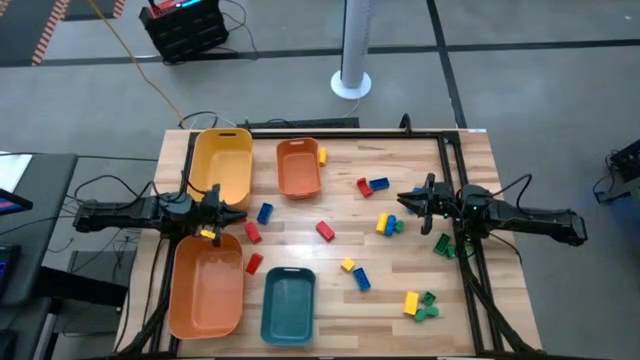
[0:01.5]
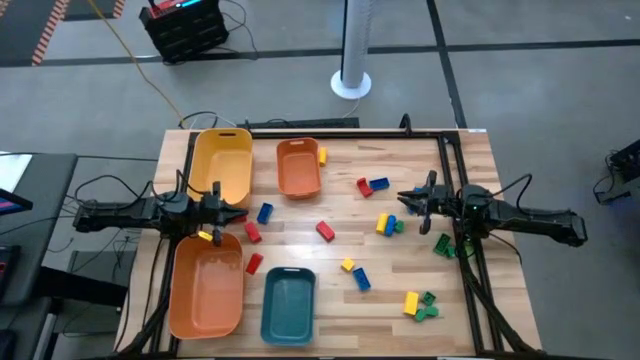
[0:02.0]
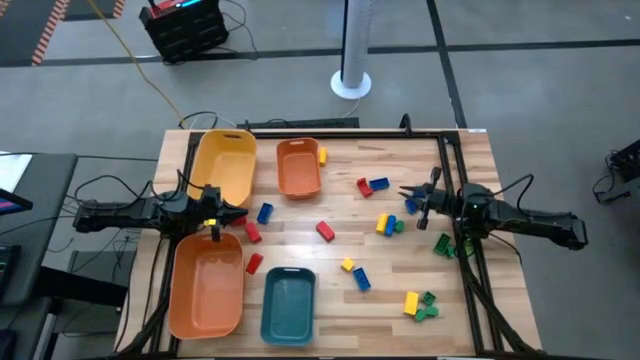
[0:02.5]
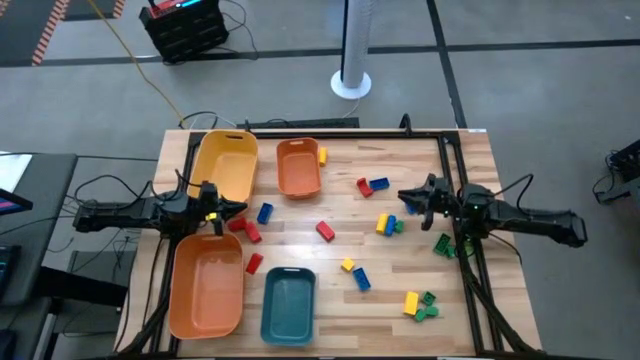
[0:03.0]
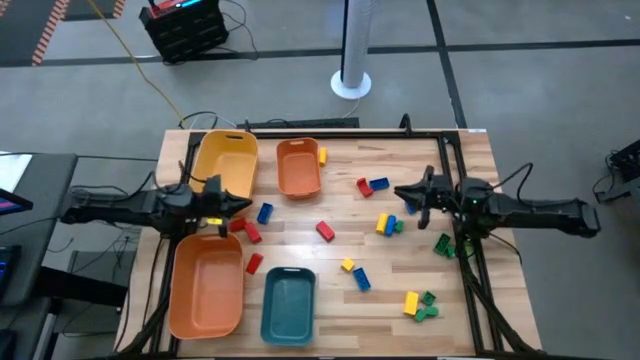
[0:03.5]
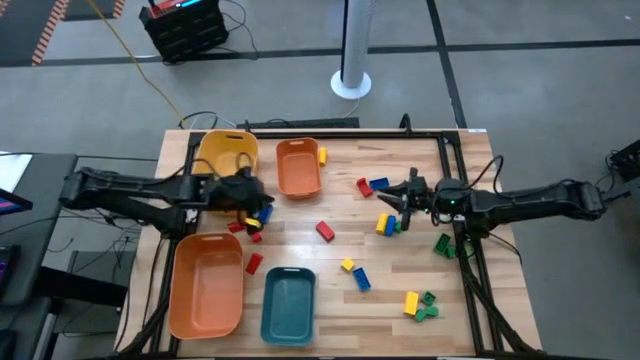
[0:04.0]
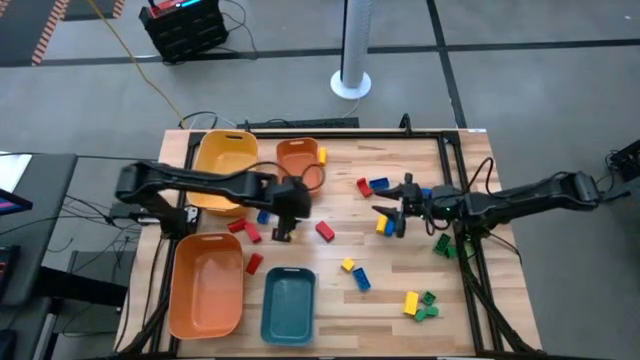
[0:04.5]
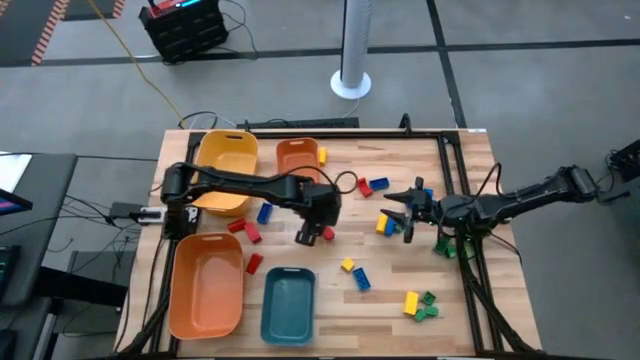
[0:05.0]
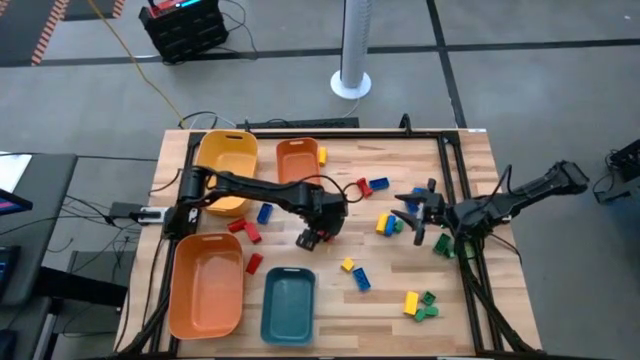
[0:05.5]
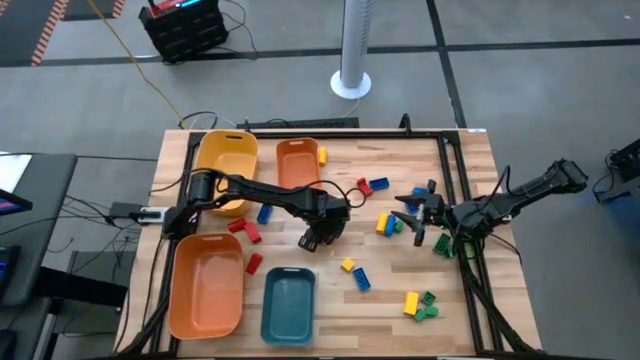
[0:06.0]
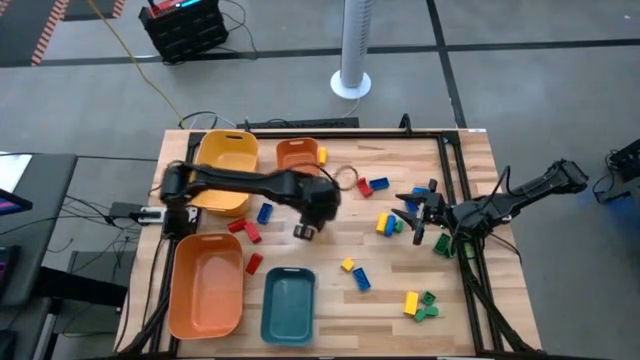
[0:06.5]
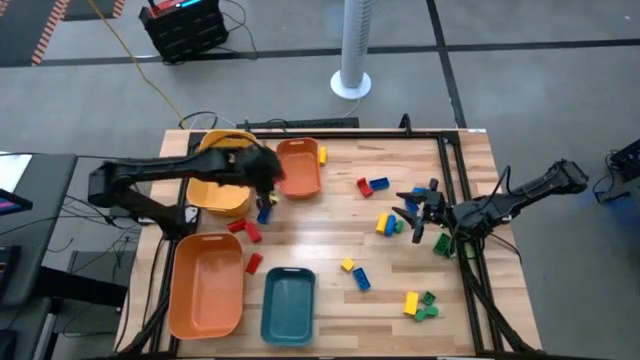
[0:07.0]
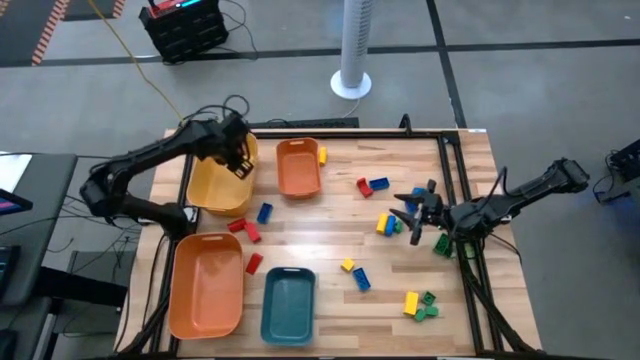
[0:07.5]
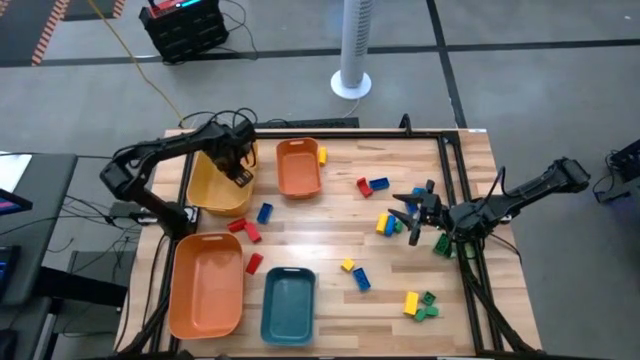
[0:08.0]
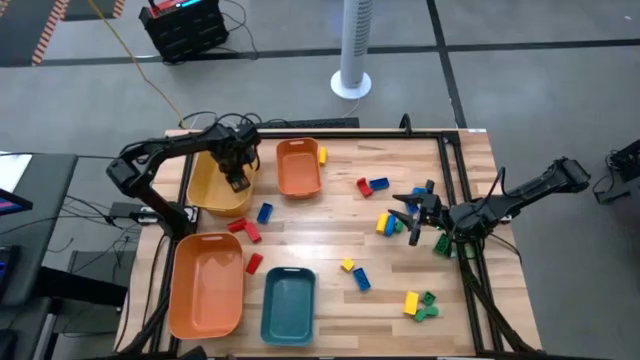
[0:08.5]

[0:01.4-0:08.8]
Task: Sort blocks
Put the red wooden block into the yellow bin

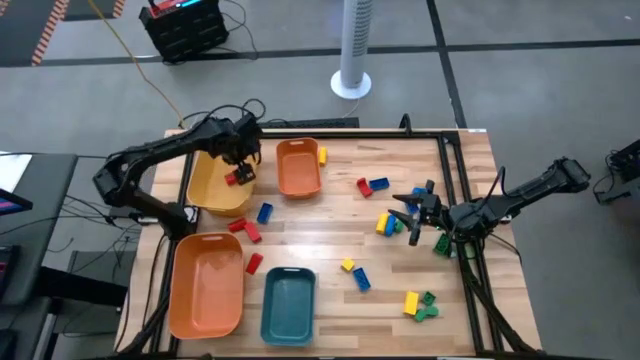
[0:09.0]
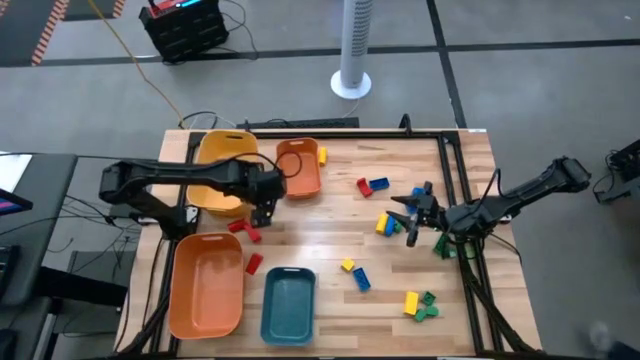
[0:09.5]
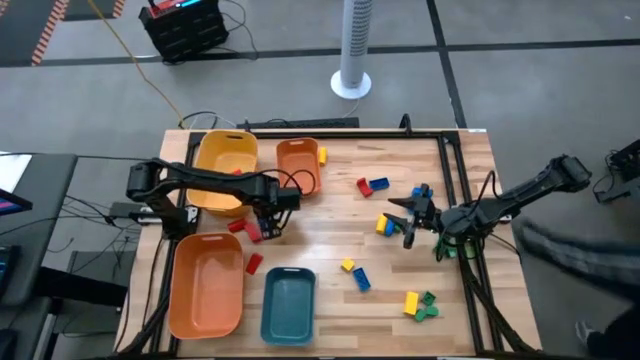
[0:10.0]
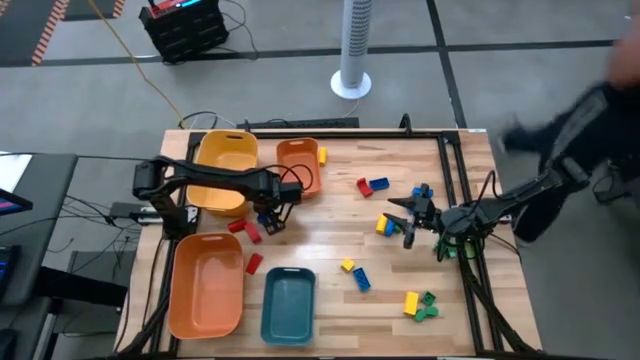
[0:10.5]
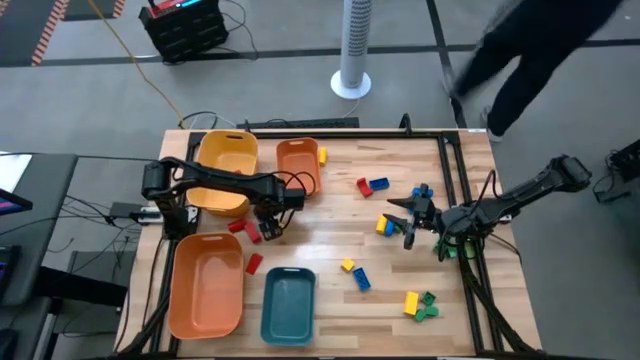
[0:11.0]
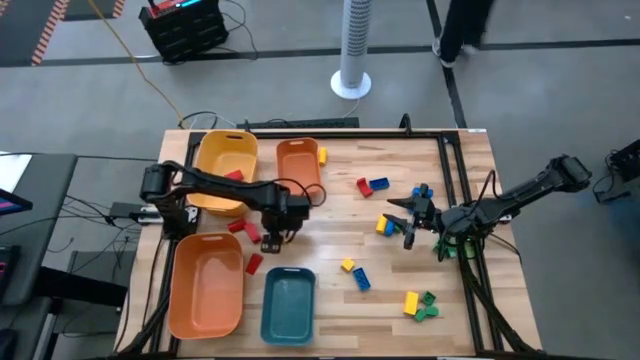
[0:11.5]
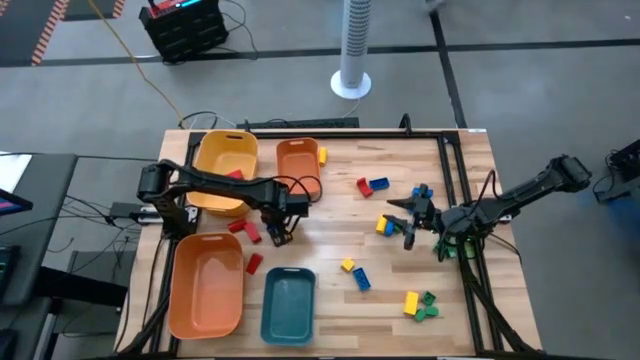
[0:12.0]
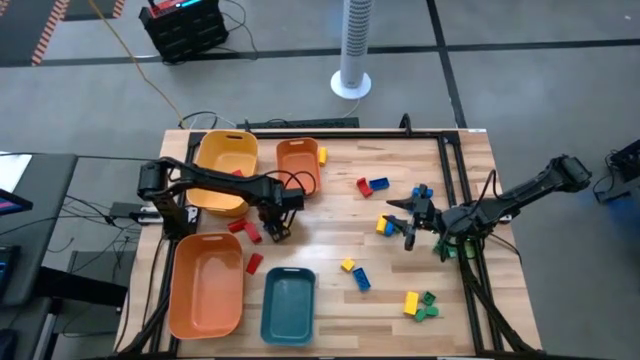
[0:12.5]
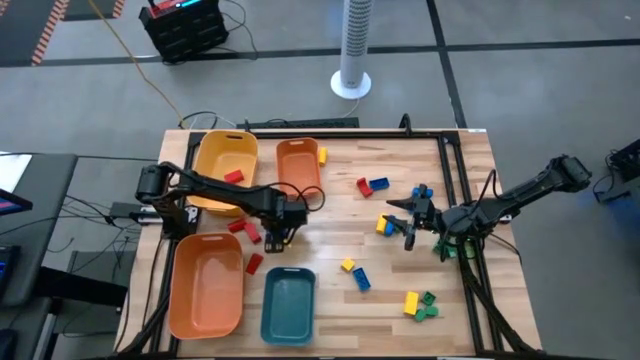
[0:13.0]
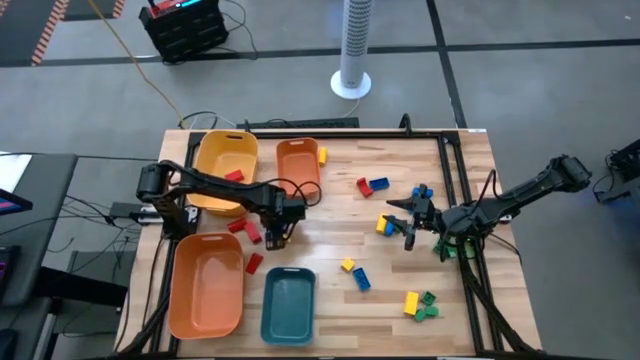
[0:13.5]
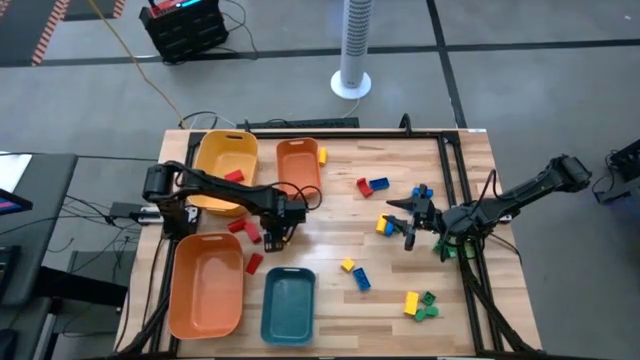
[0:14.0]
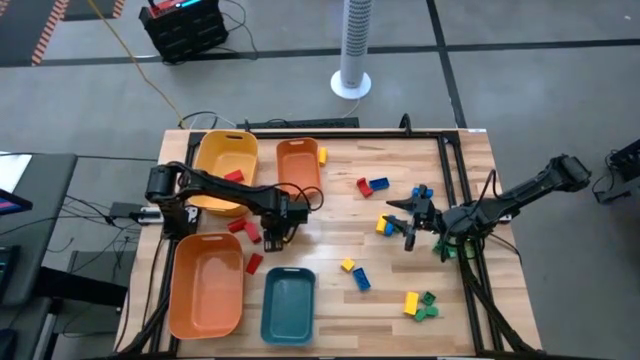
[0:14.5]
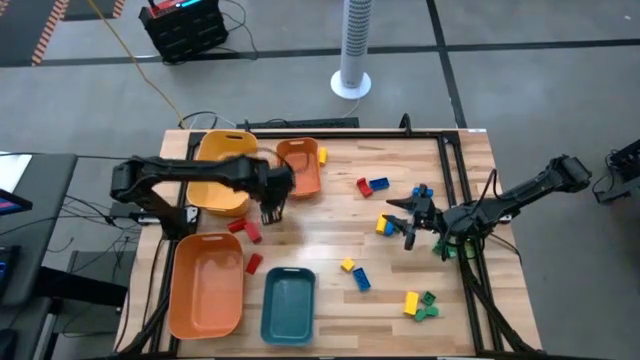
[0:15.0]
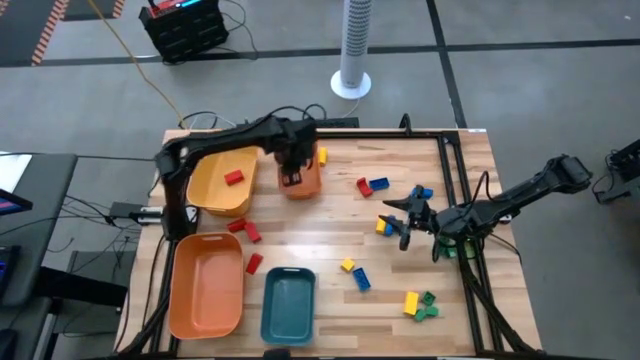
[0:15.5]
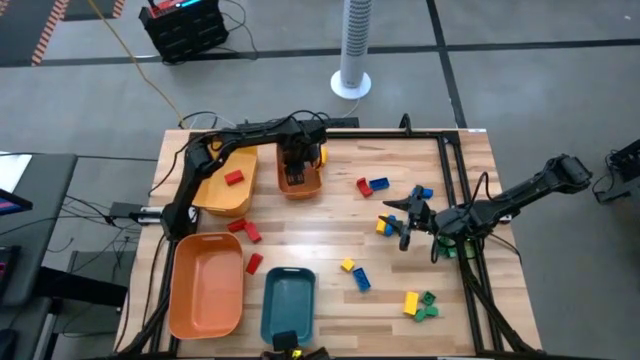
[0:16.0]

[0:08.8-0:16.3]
Put the blue game piece into the top orange bin

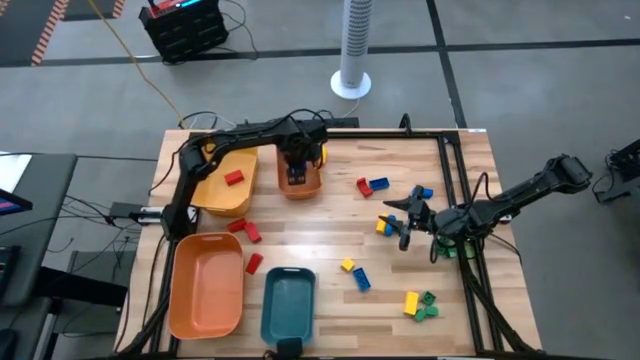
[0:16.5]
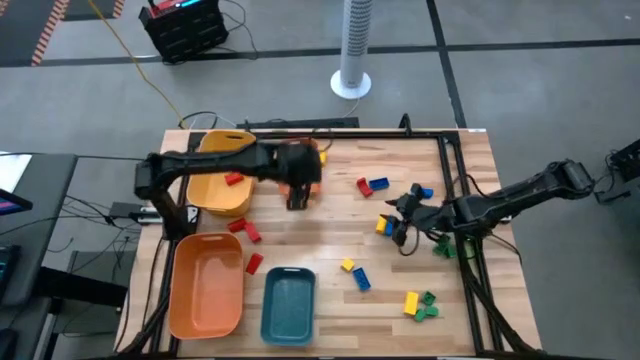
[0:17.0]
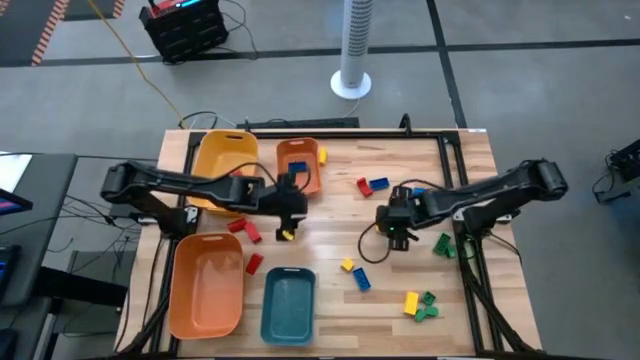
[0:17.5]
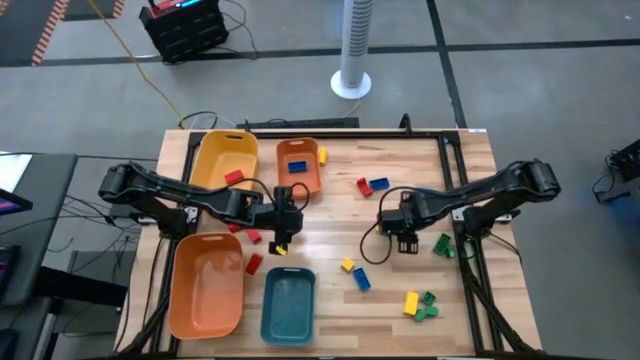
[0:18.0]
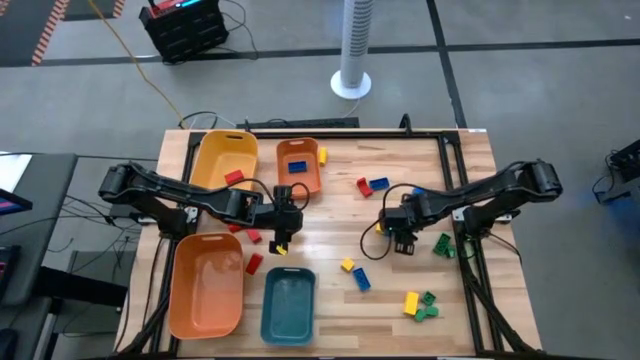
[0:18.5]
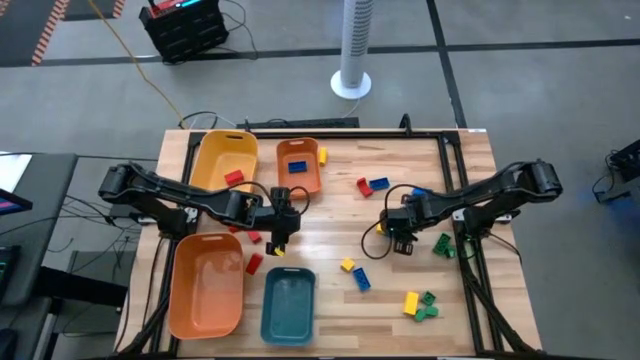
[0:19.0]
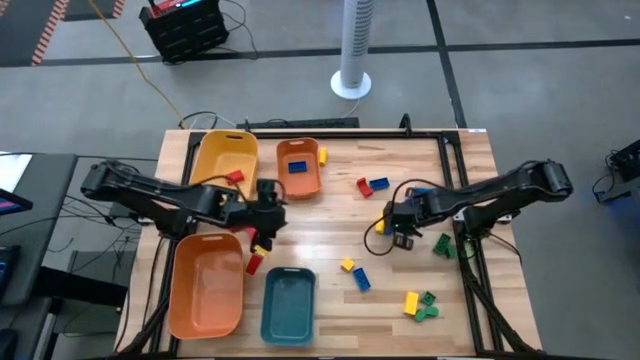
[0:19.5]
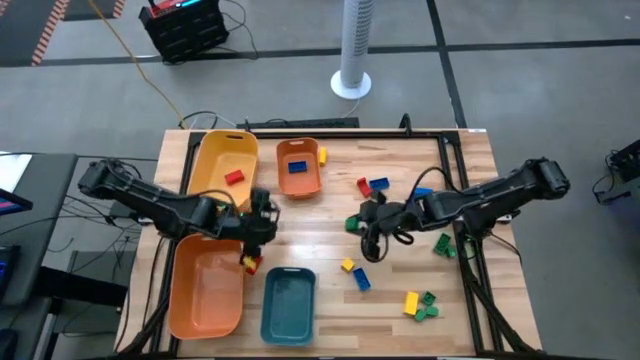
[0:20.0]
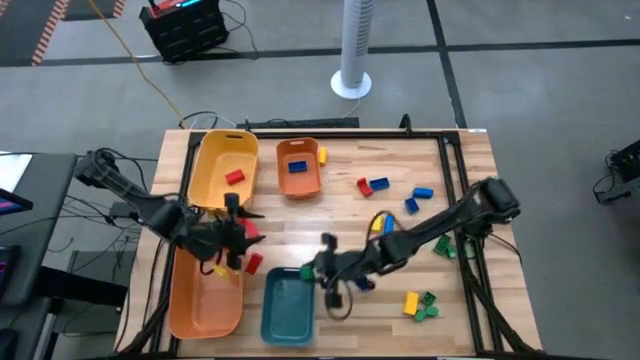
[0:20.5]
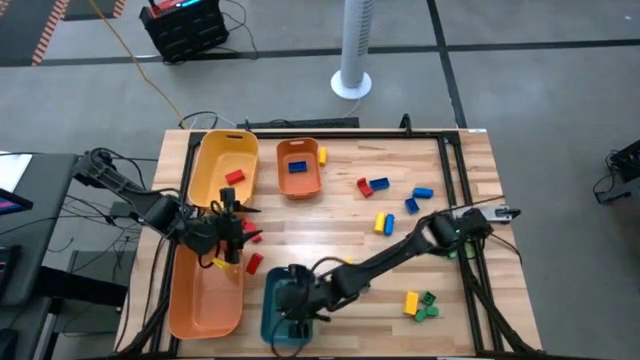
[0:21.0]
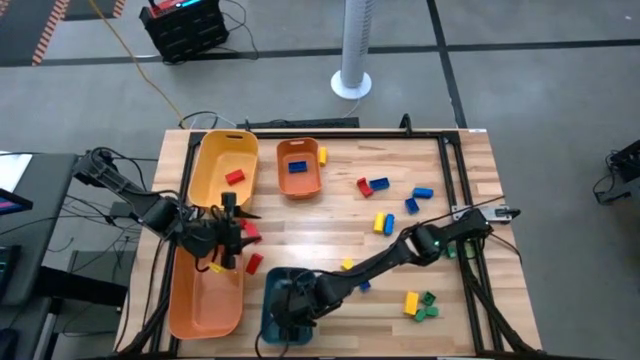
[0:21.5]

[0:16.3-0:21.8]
Put the green game piece into the blue bin

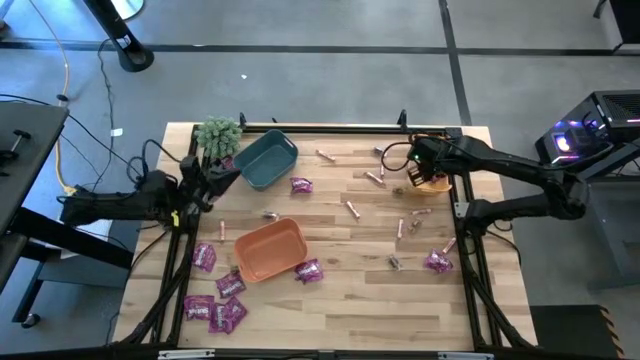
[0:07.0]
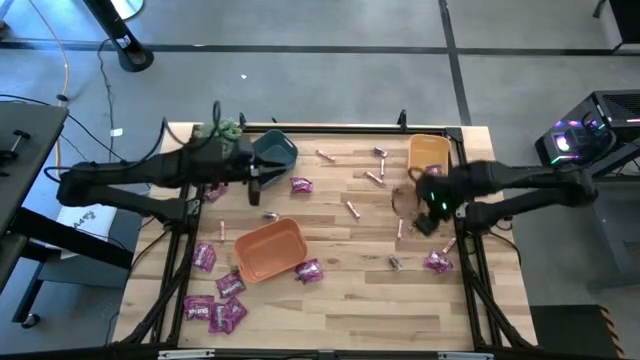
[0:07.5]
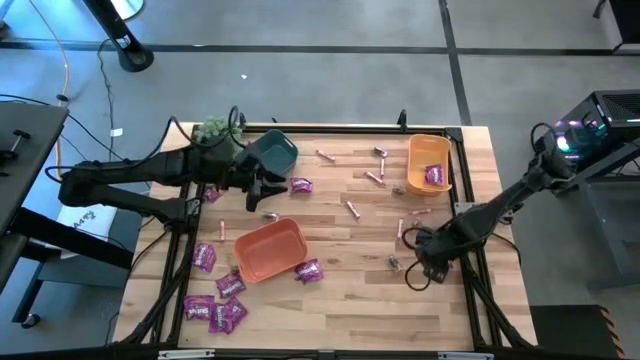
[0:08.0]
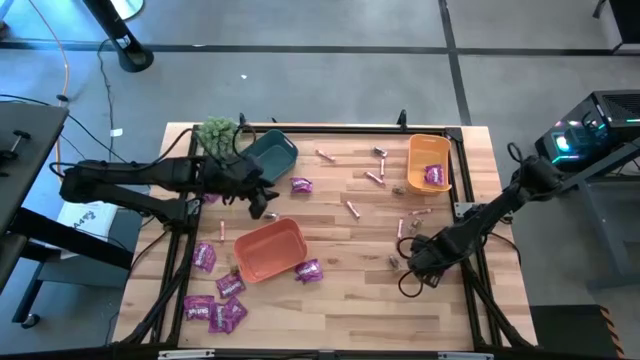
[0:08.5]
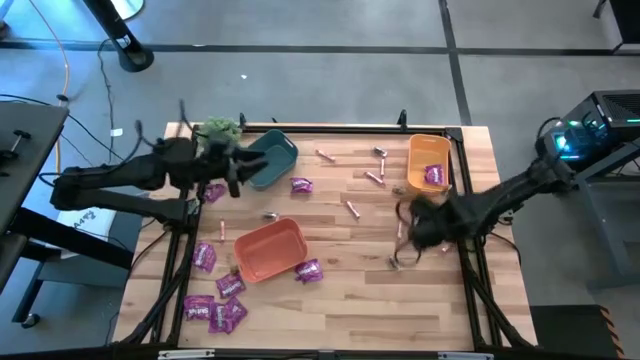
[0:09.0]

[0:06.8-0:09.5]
Task: Sort candy
Put the purple candy into the yellow bin
